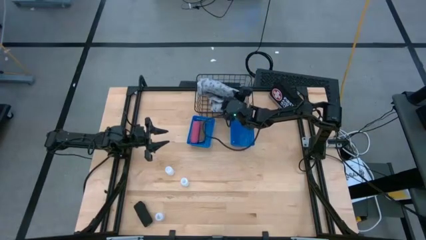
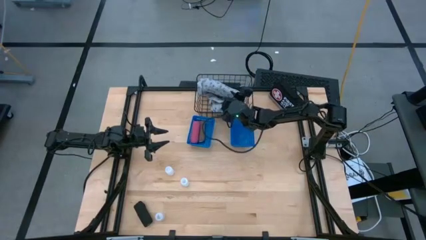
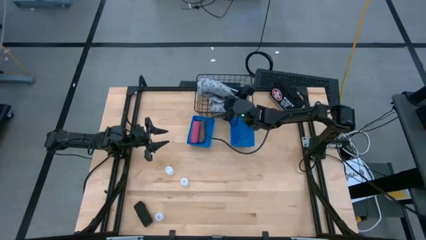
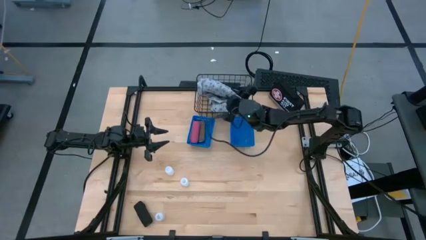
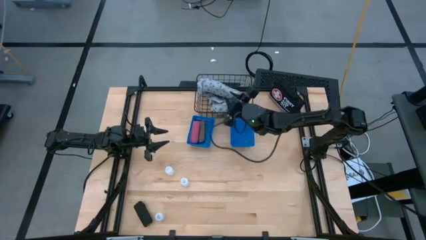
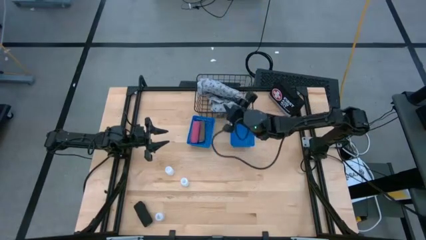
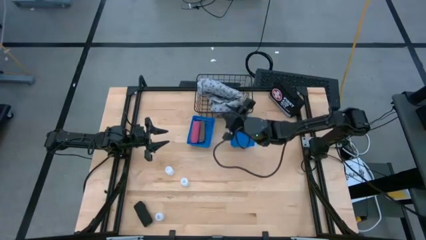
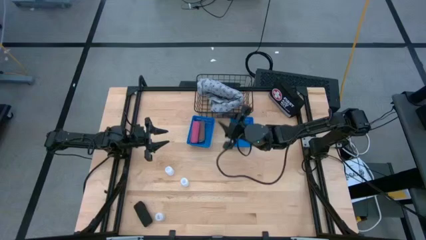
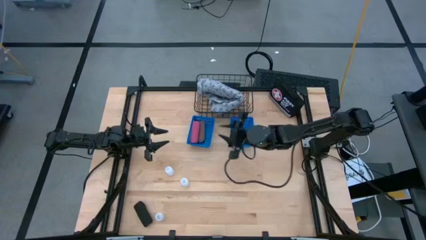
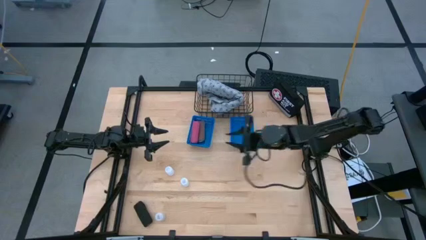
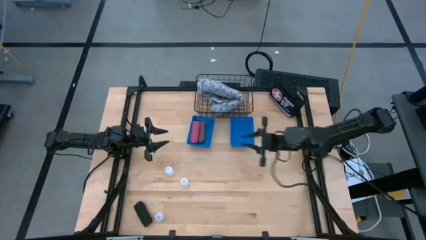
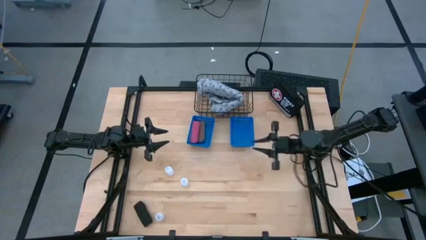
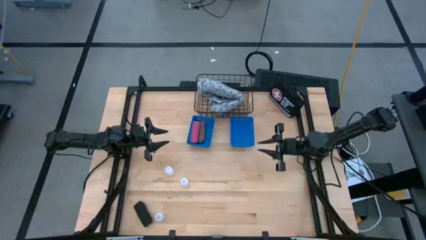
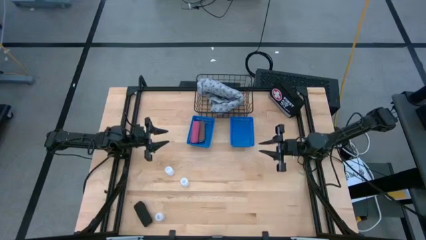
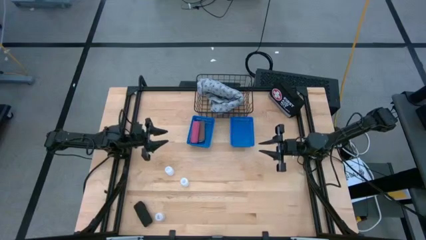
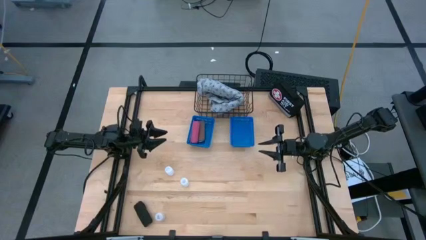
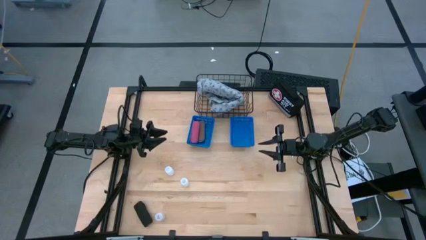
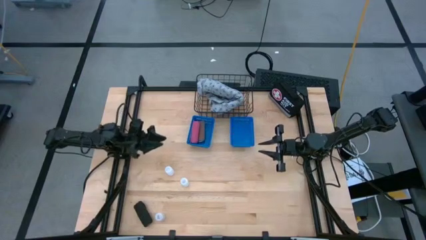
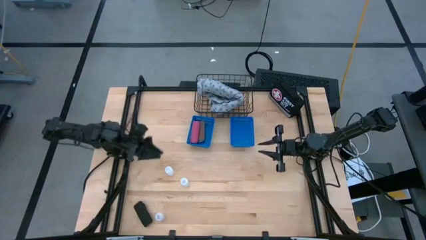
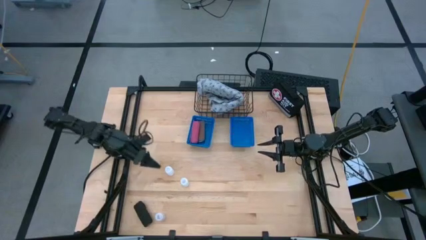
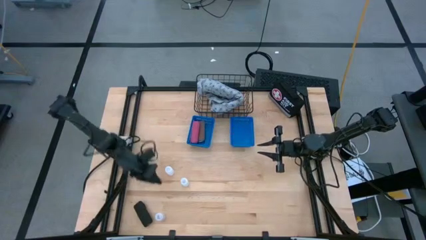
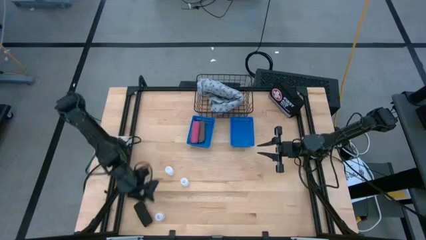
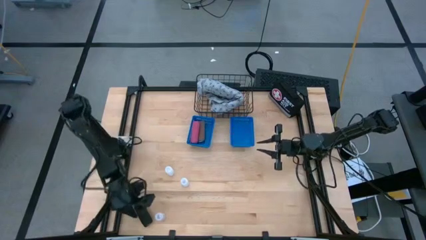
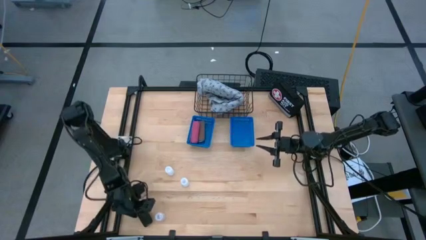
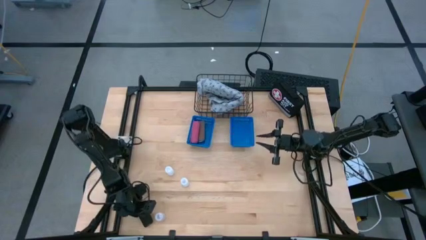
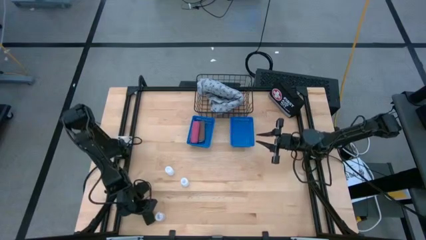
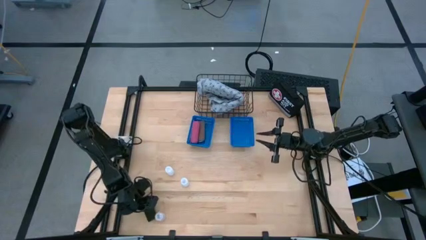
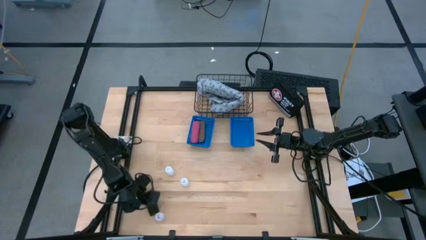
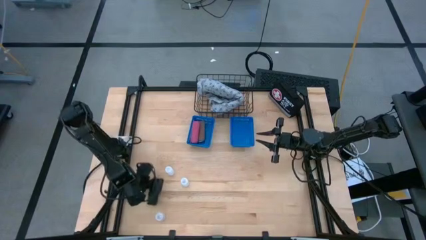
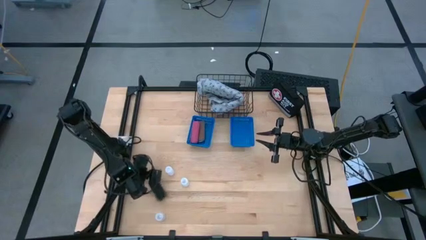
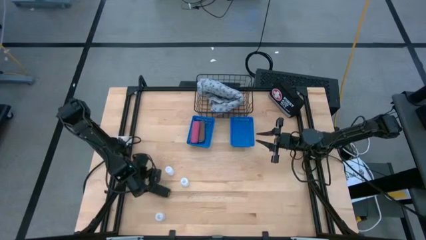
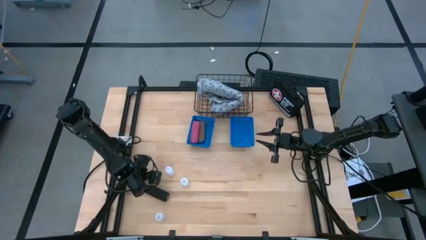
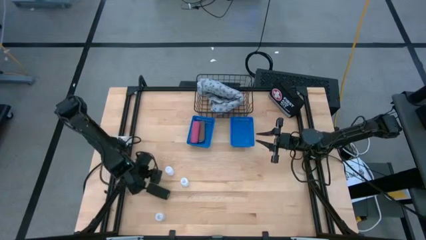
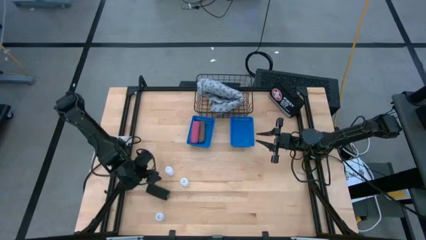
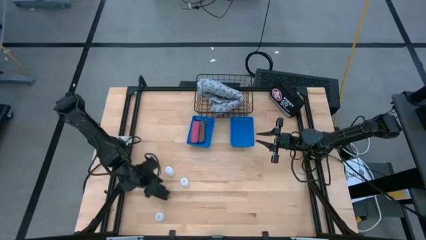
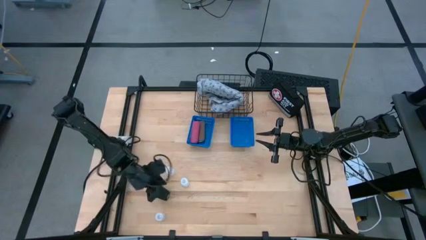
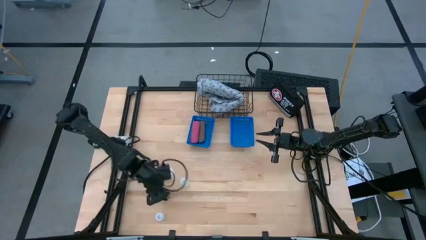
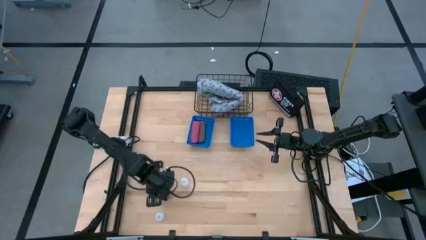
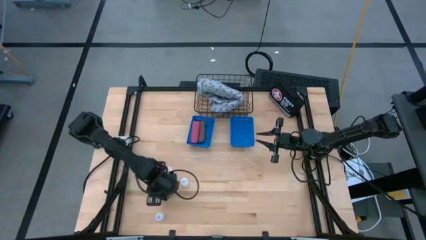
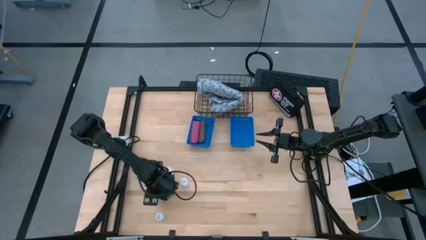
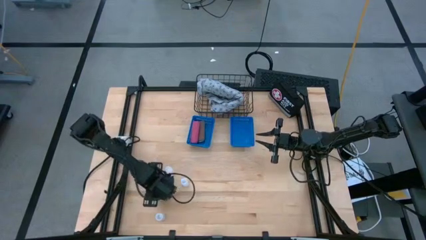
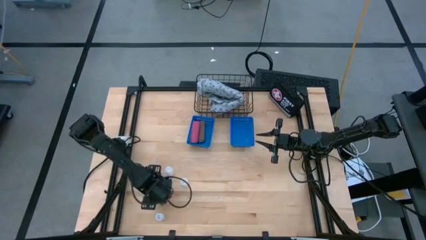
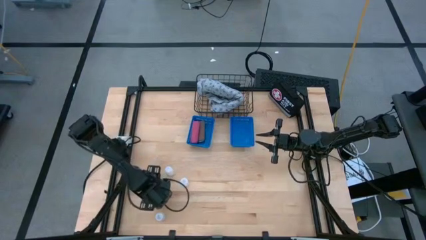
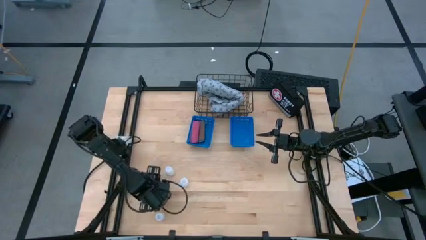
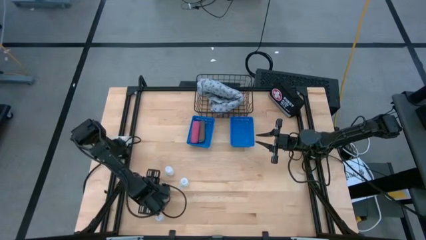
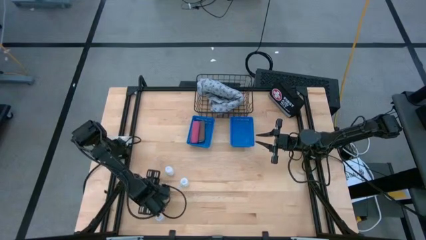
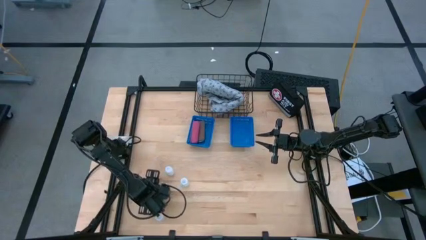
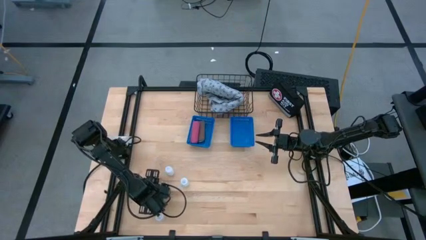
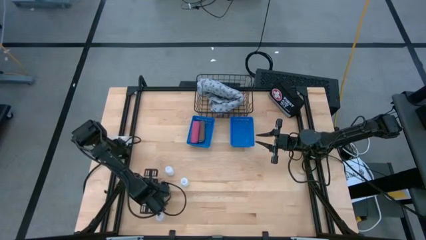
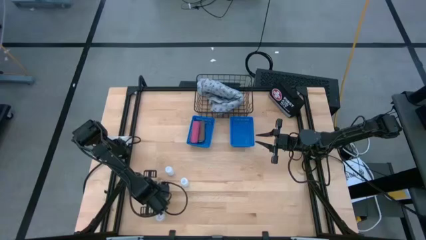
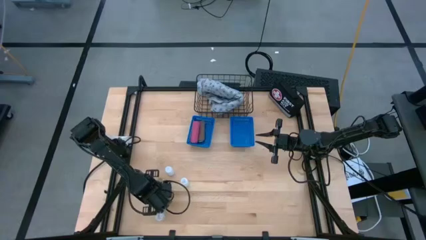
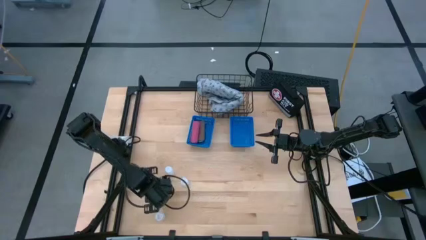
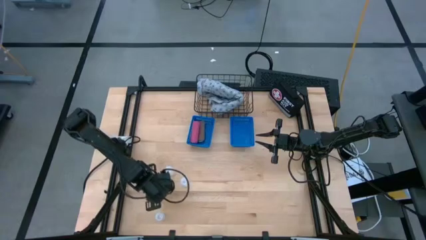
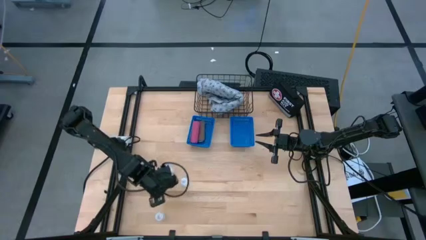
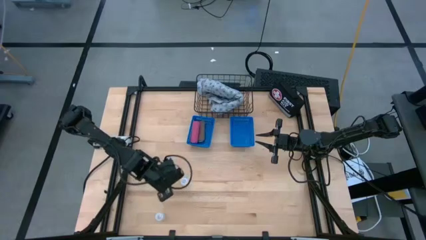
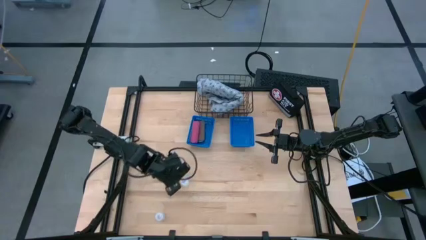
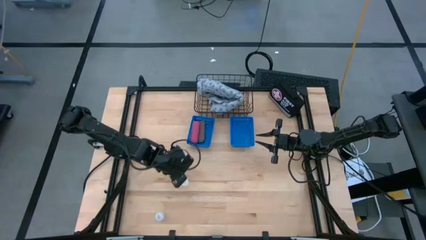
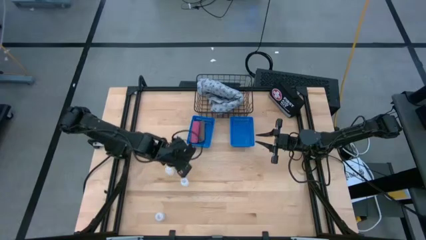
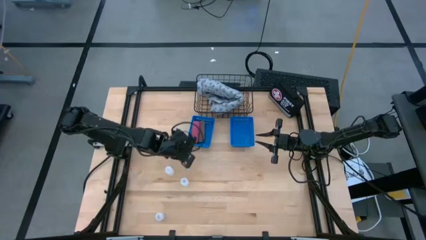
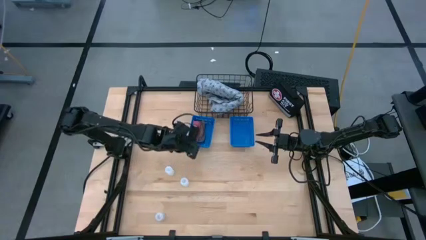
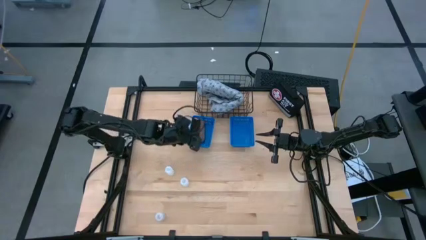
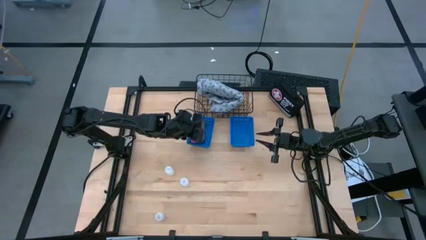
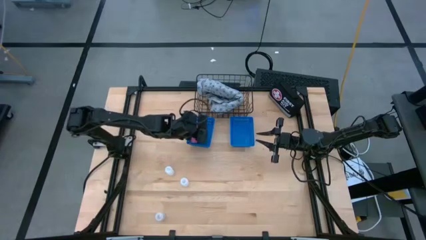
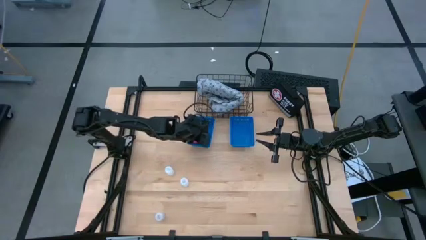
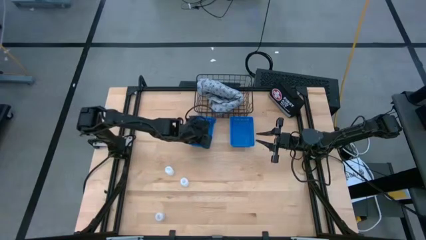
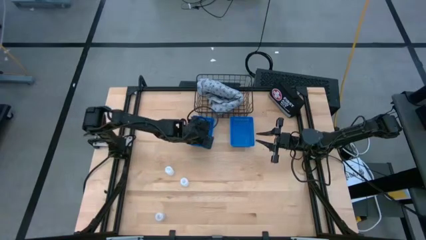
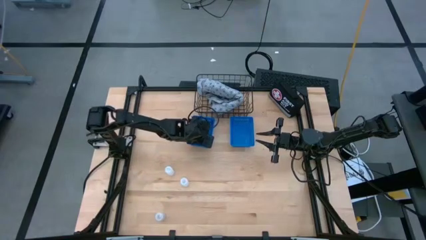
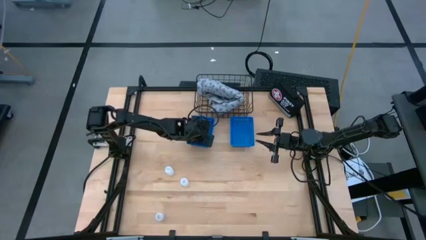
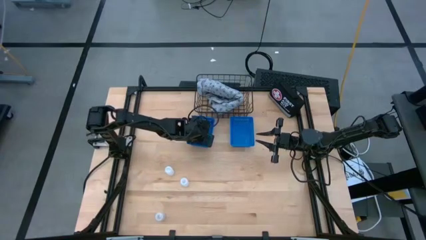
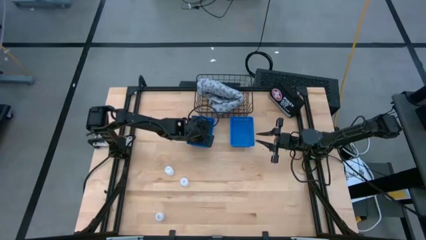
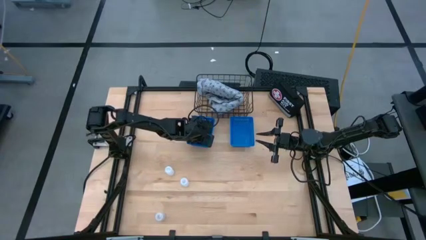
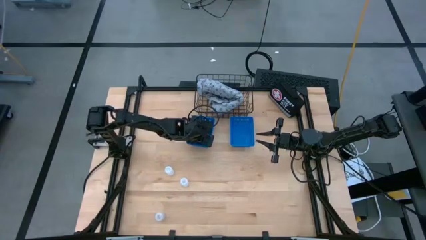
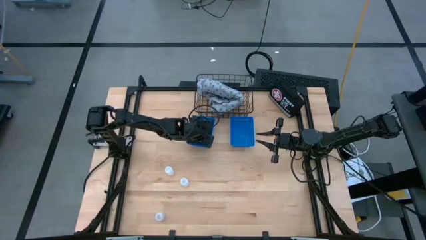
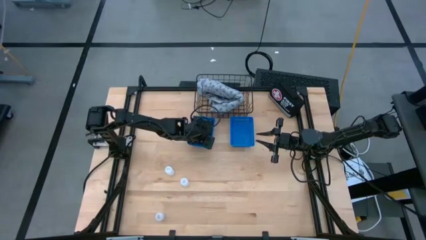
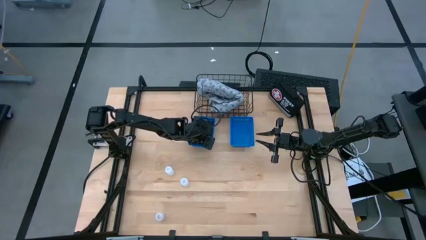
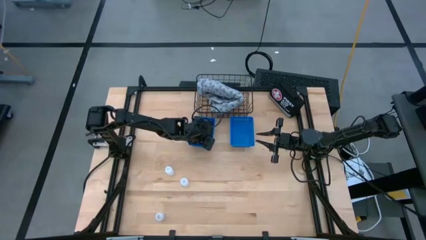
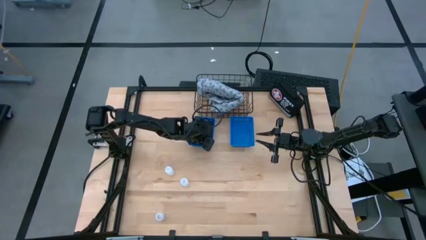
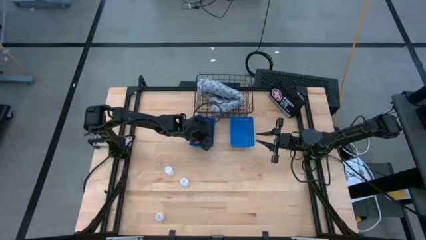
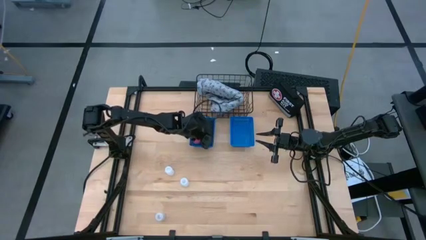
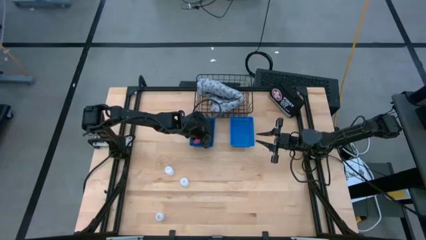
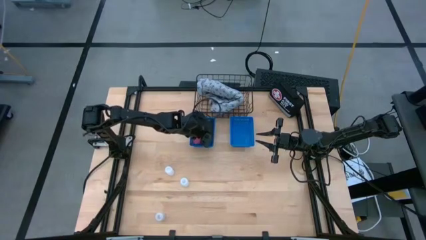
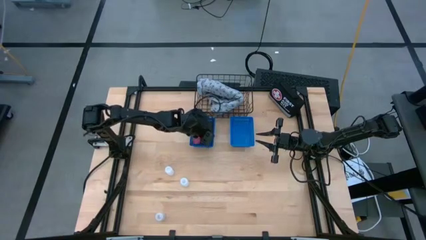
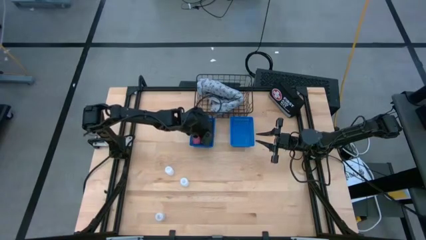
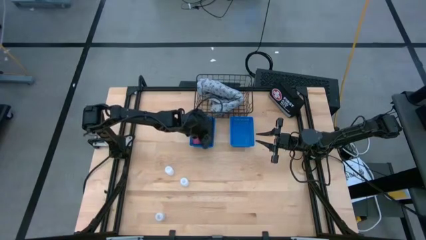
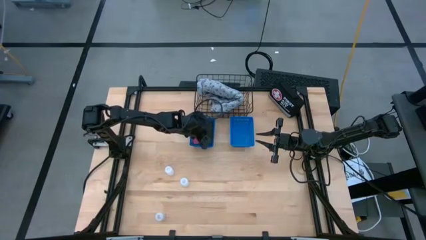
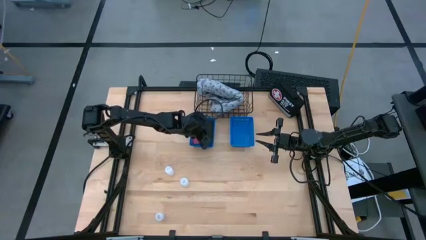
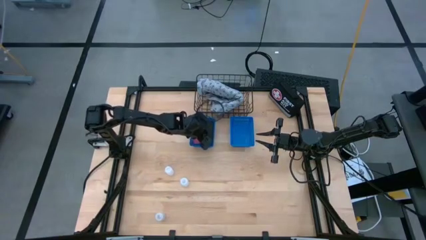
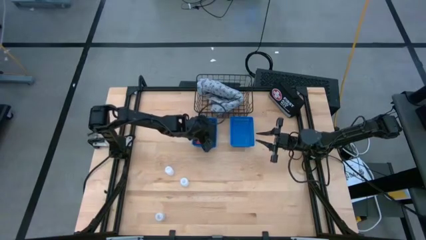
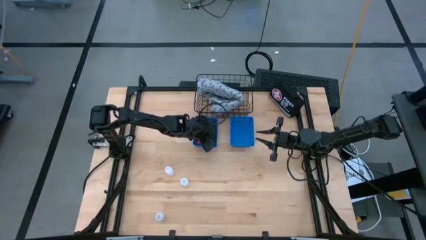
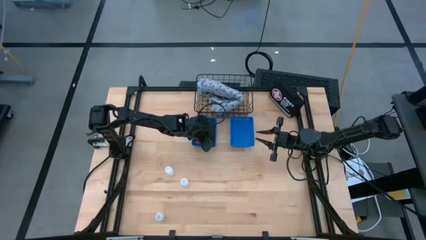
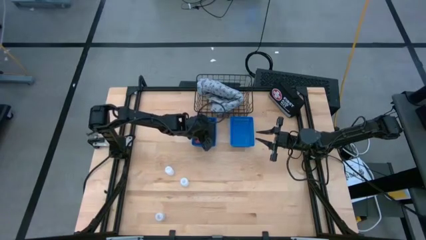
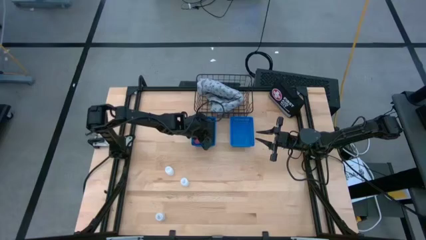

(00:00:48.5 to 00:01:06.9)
Task: Pick & Place Medicine items
Put the black bandage into the left blue bin
